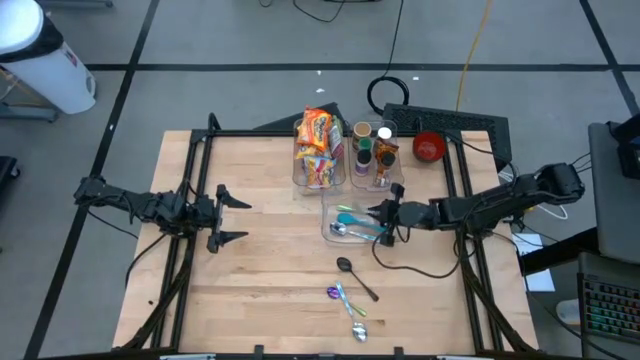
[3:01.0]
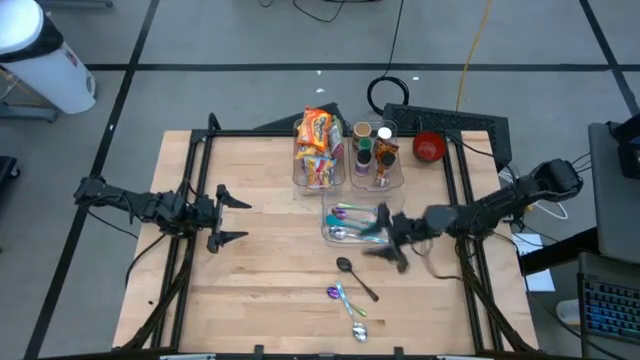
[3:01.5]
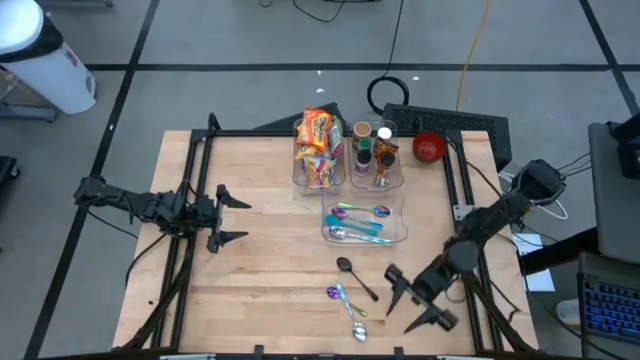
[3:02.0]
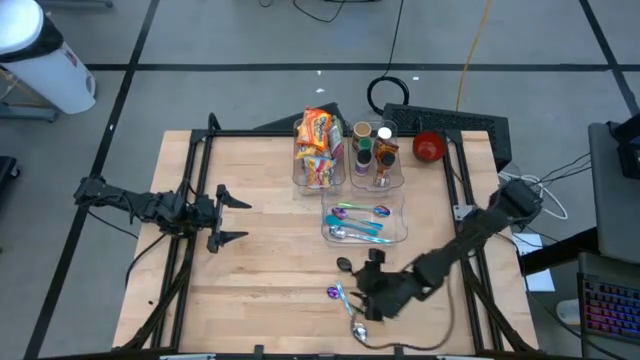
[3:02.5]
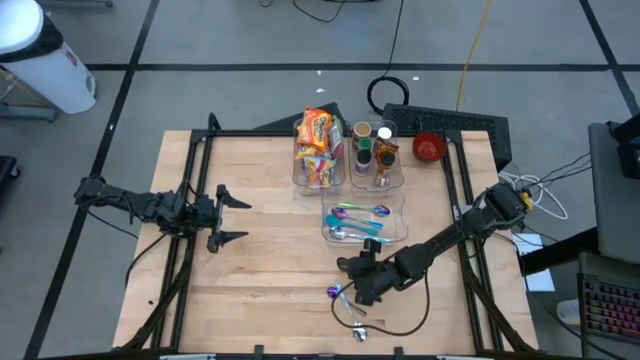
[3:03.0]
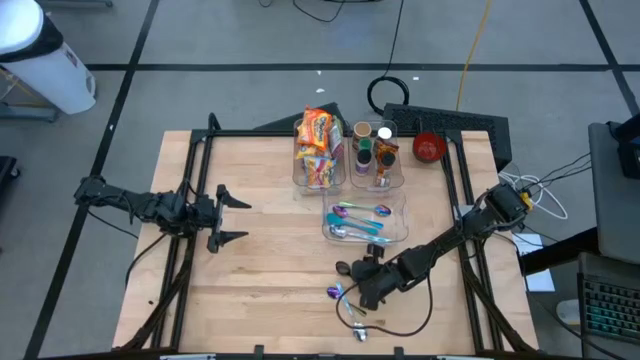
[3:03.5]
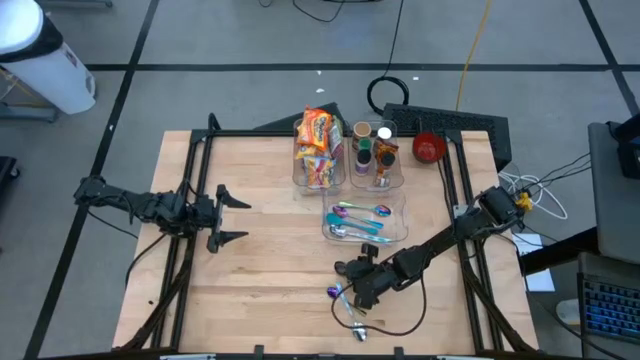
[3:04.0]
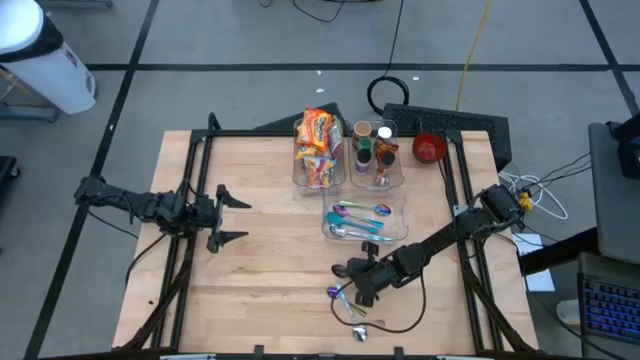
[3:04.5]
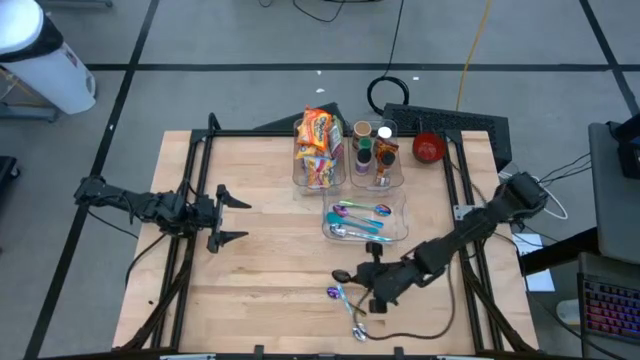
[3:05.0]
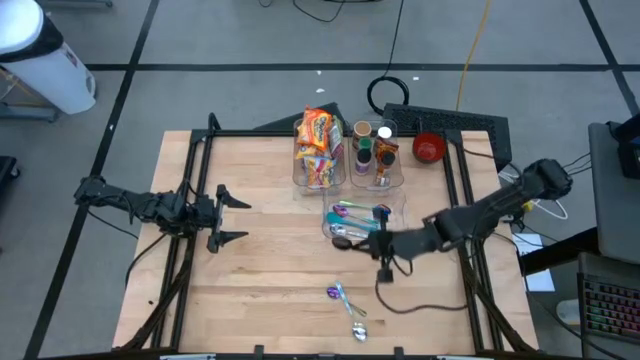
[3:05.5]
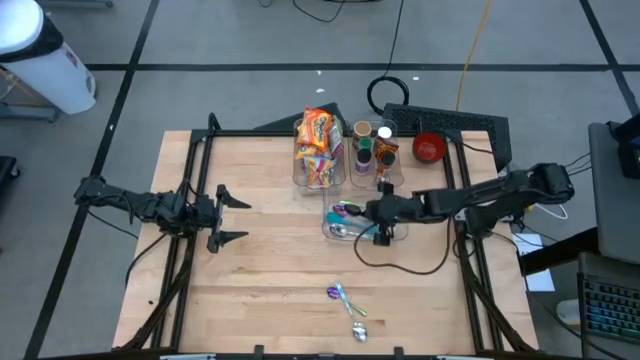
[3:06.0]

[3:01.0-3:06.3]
Task: Pick & Place Food Item
Put the black spoon into the bottom transparent bin

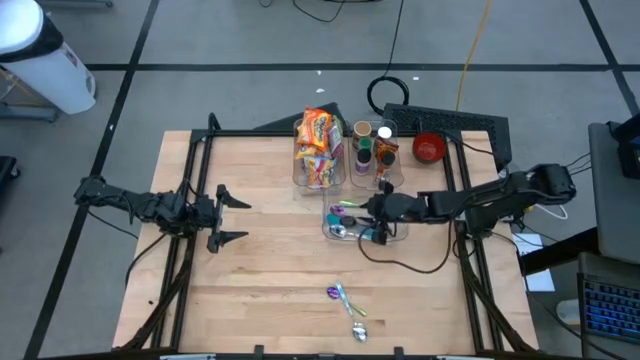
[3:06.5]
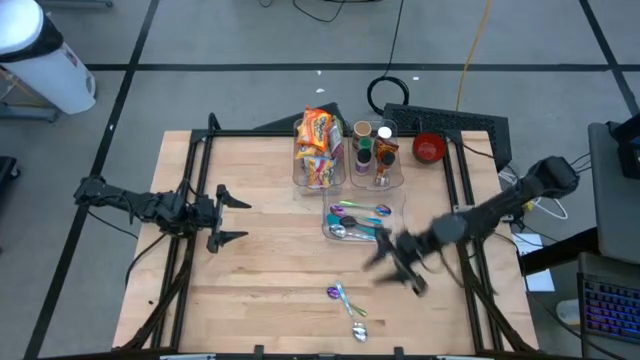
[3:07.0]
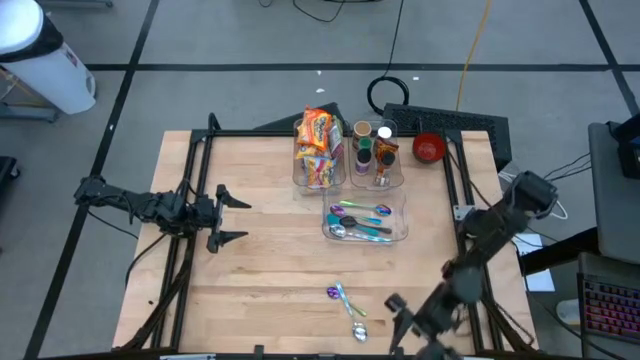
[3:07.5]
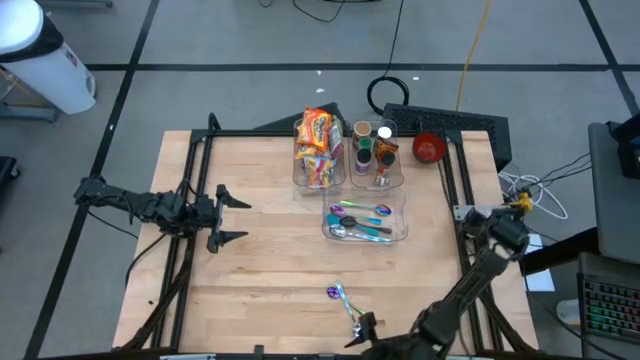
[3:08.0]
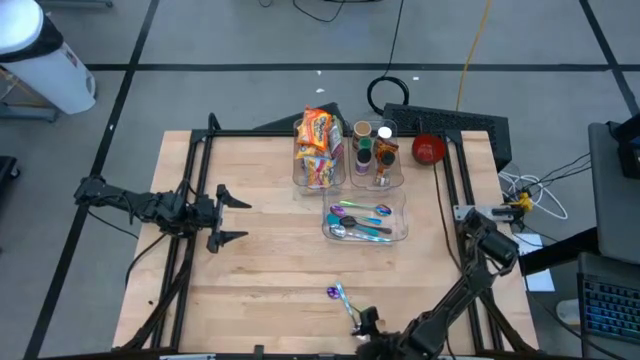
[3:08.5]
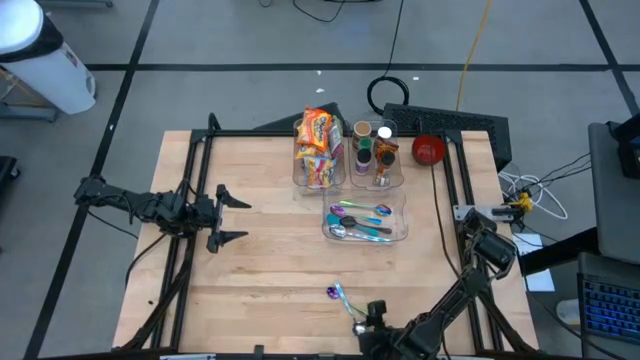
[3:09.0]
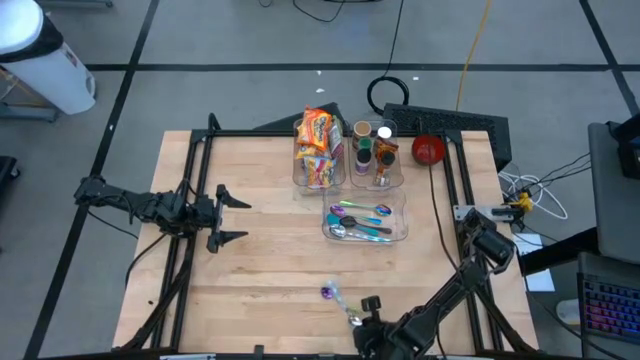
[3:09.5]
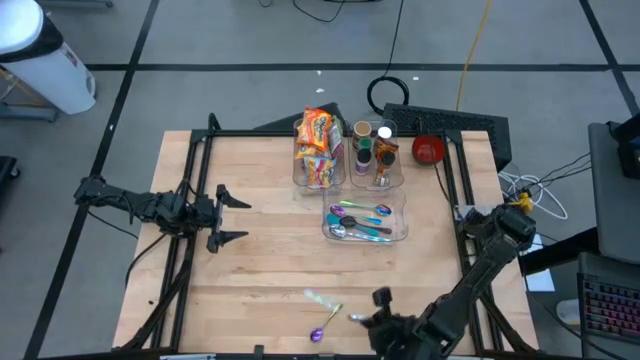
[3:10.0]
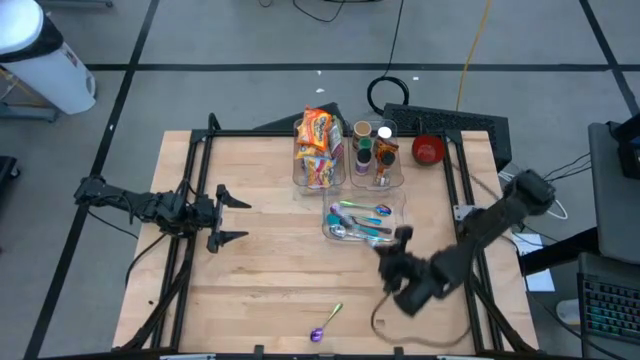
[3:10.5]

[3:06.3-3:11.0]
Put the blue white patterned spoon into the bottom transparent bin

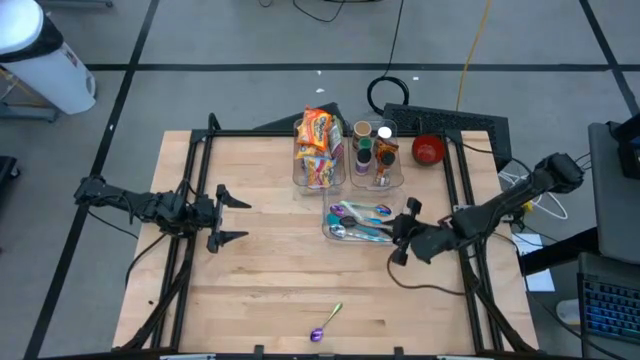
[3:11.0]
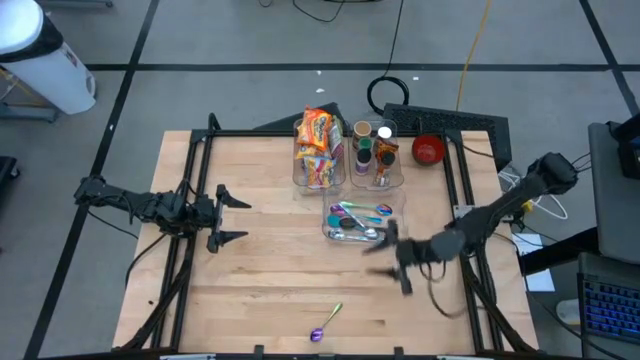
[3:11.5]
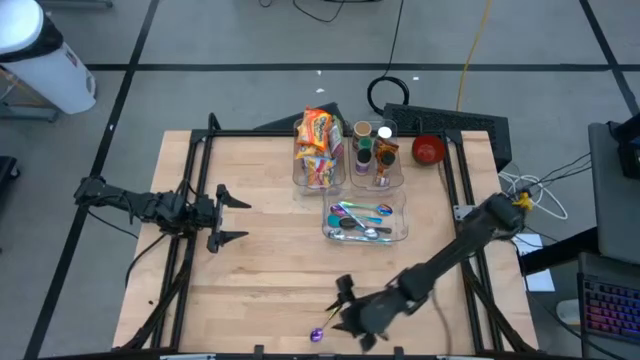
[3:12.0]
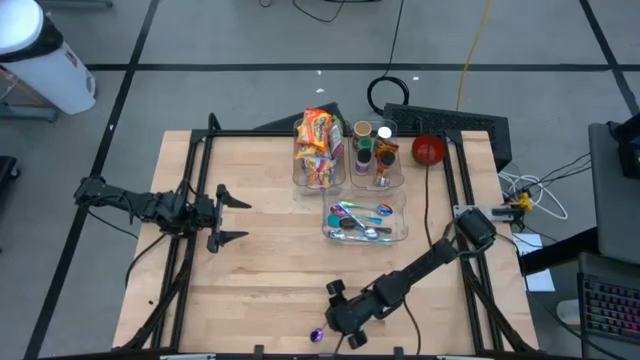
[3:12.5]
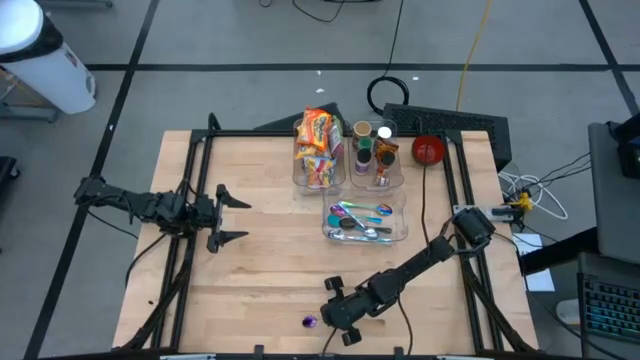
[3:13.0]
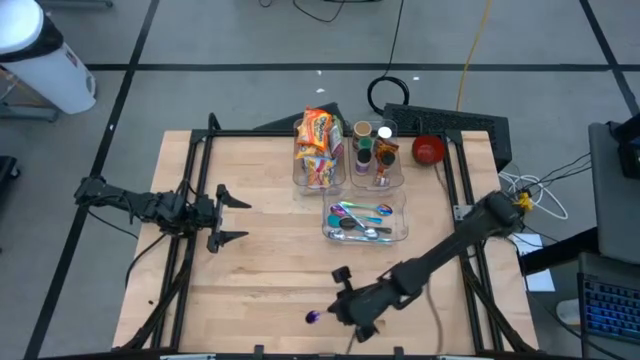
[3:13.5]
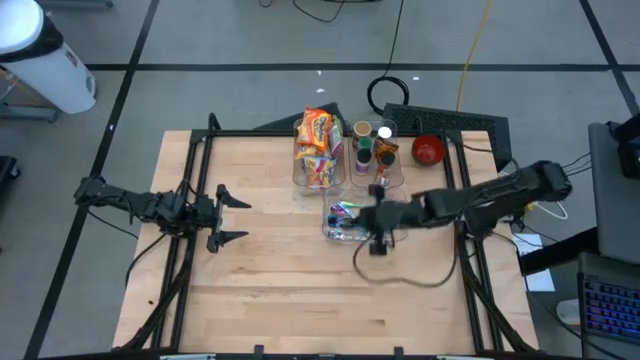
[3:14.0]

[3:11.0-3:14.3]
Put the blue green spoon into the bottom transparent bin

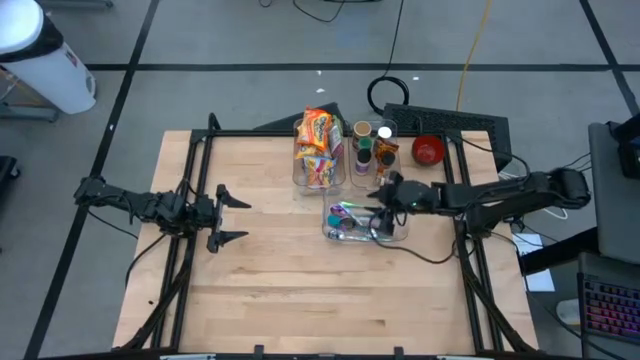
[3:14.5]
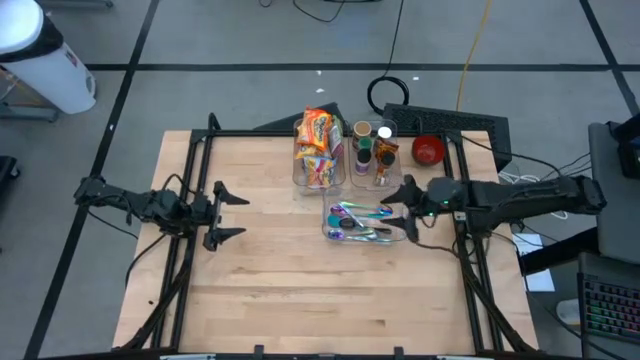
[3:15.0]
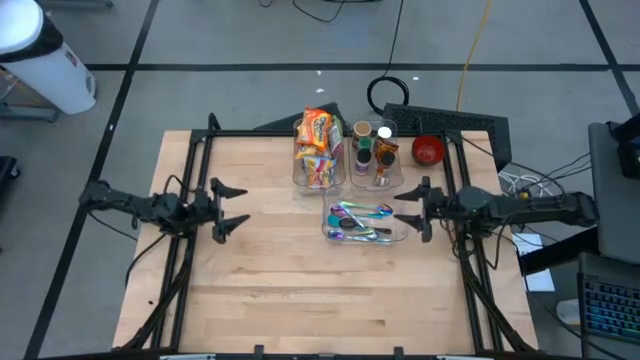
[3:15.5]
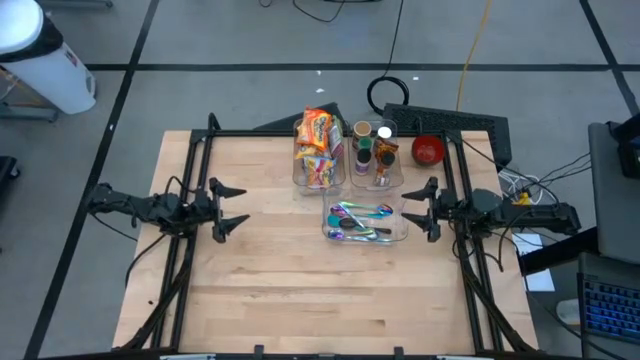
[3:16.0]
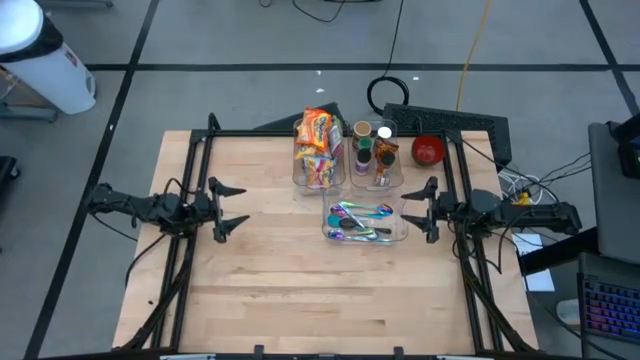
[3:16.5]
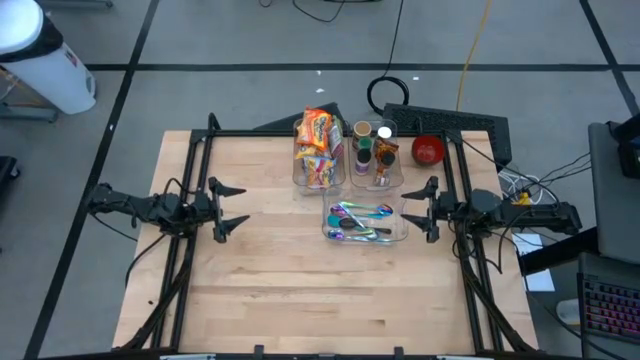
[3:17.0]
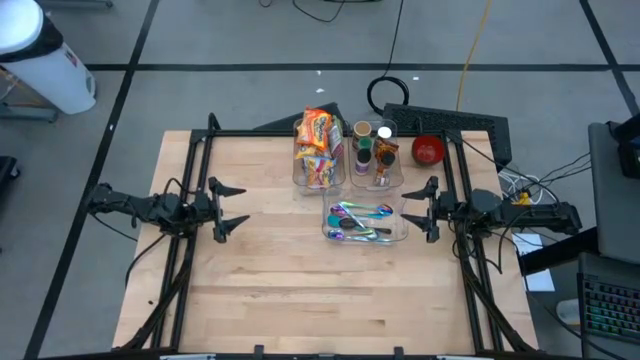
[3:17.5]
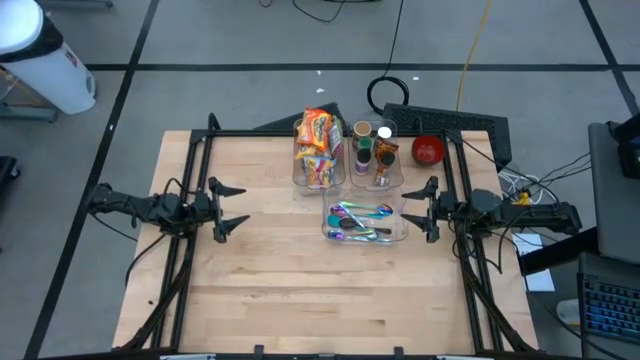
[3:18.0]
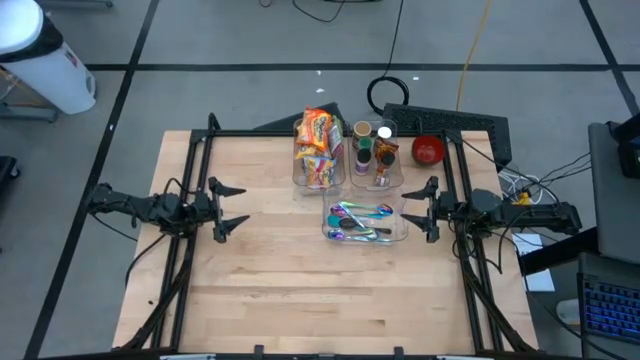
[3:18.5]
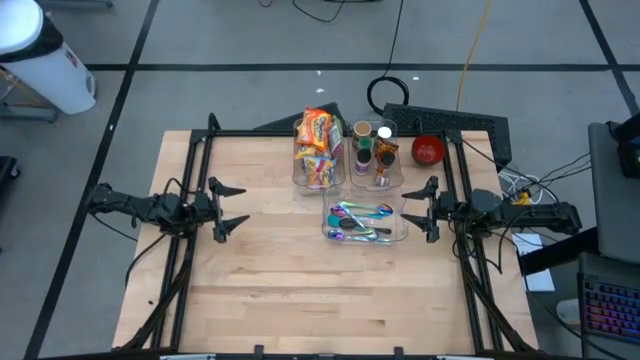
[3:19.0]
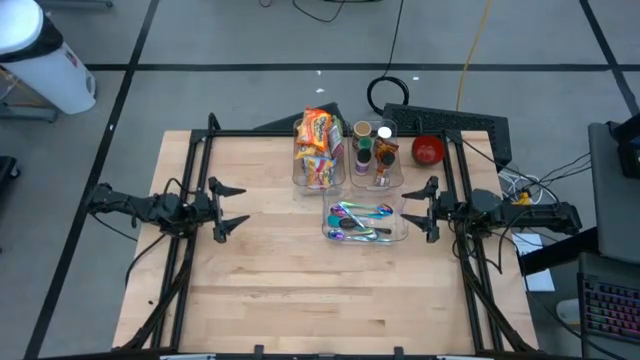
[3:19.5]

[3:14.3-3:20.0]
Return to Home Position

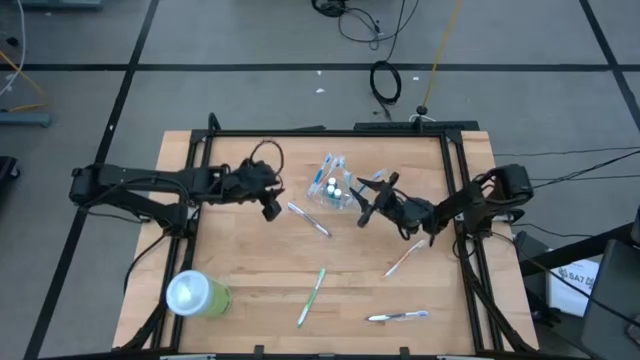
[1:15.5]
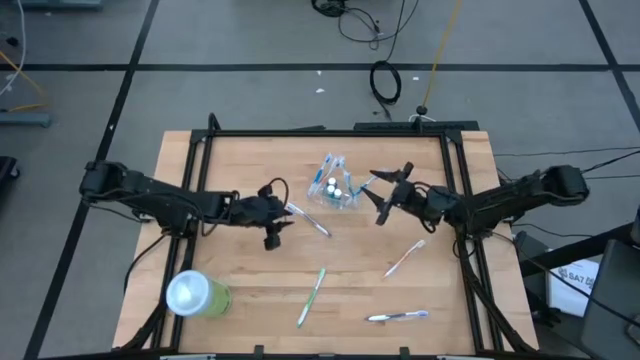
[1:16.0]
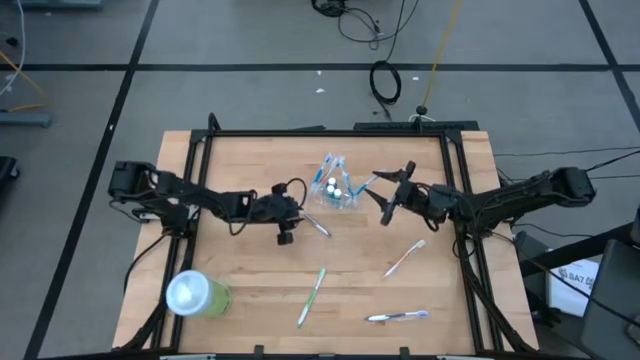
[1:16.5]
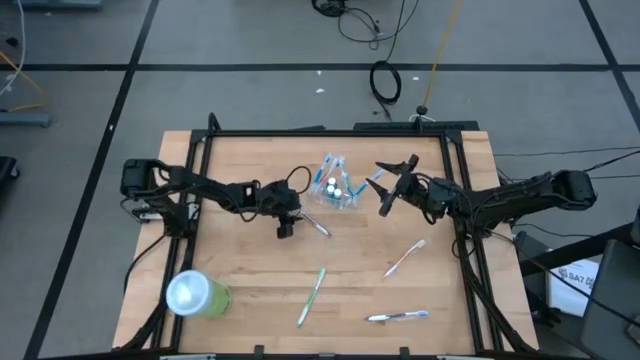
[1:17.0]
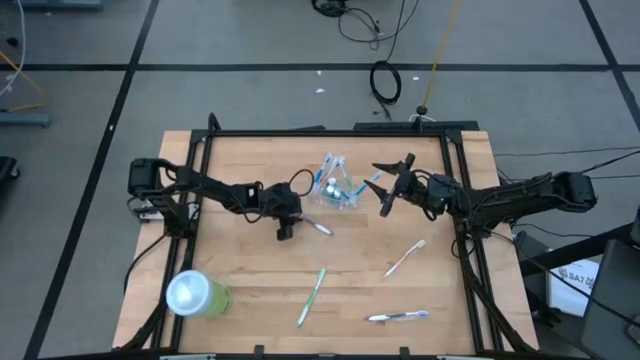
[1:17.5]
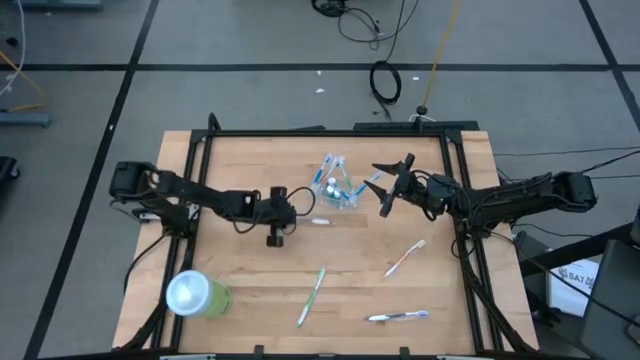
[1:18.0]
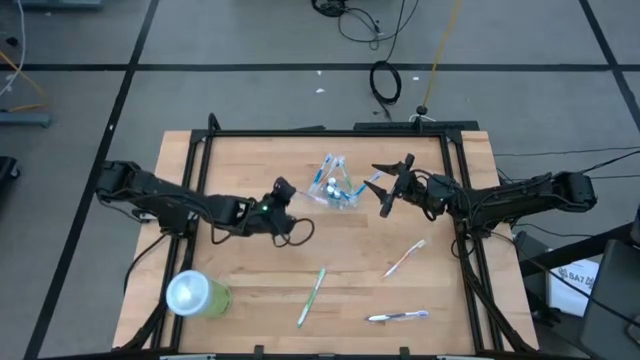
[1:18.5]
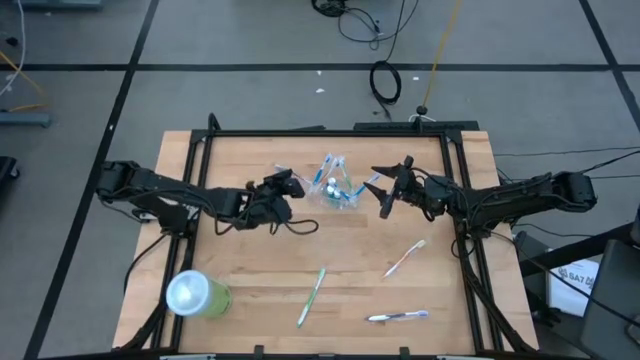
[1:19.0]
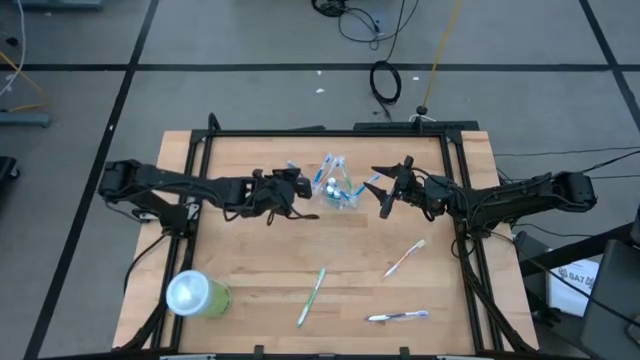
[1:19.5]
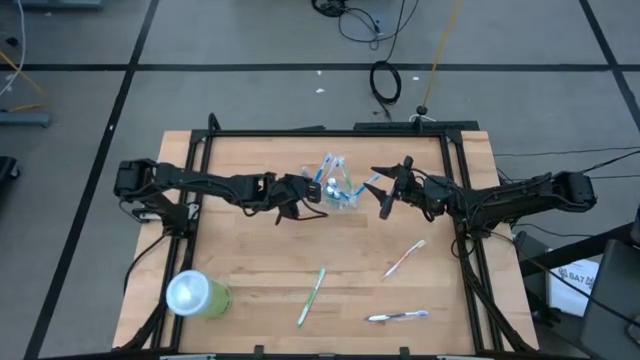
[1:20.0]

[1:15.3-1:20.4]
Task: Pick & Place toothbrushing station
Put the top purple toothbrush into the transparent organizer
